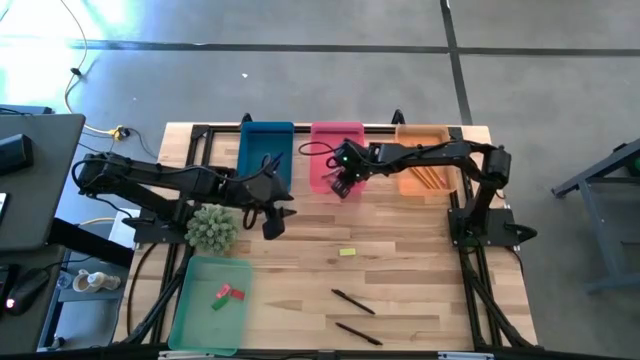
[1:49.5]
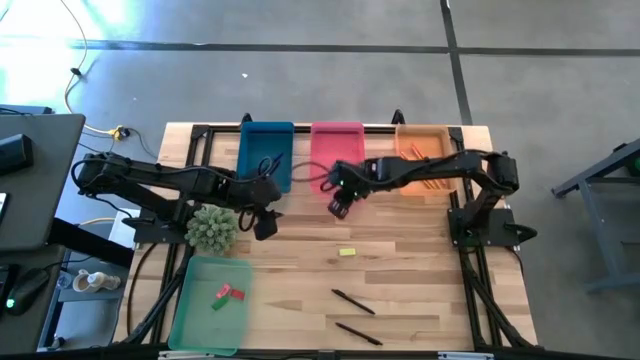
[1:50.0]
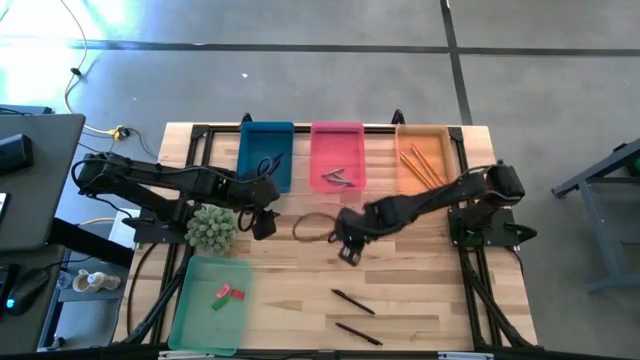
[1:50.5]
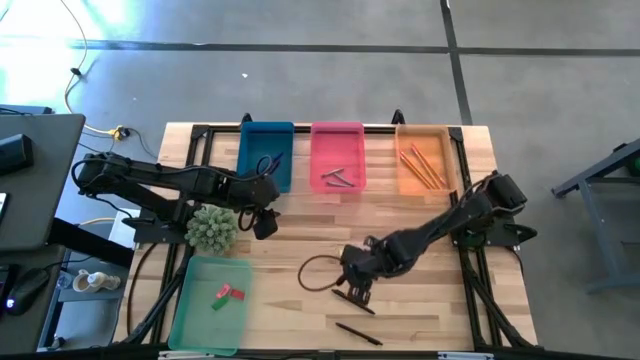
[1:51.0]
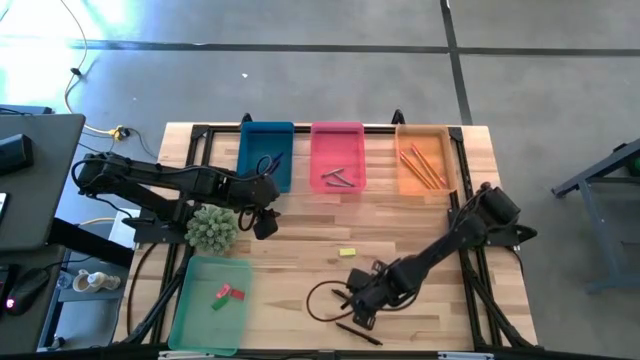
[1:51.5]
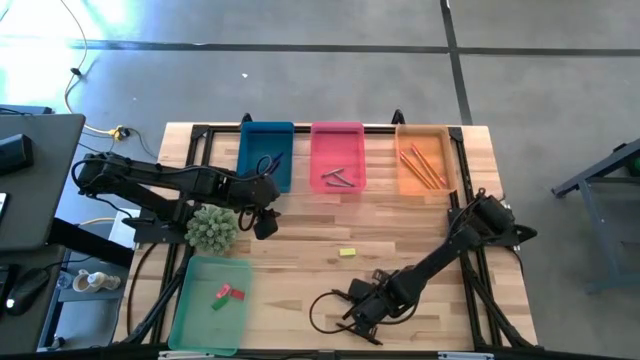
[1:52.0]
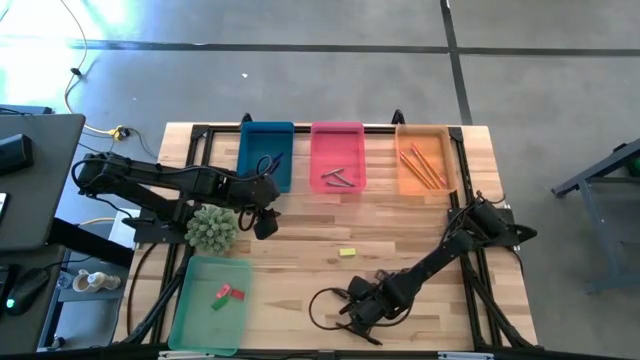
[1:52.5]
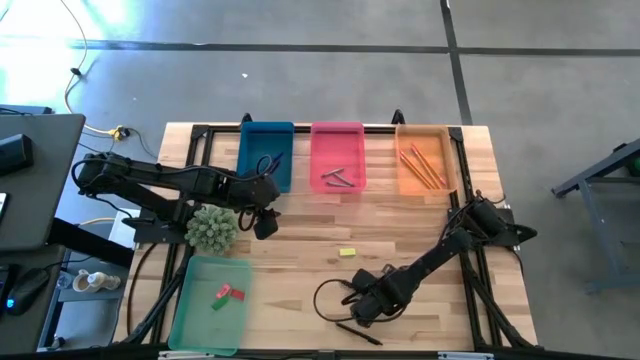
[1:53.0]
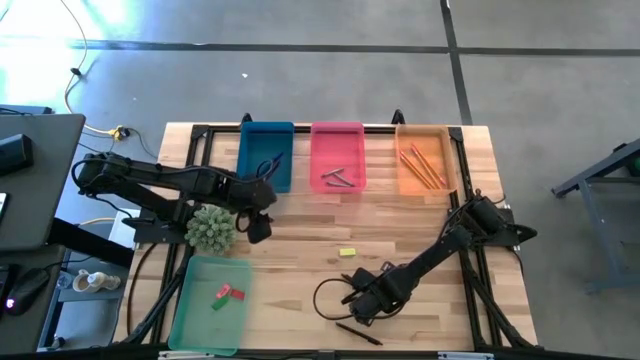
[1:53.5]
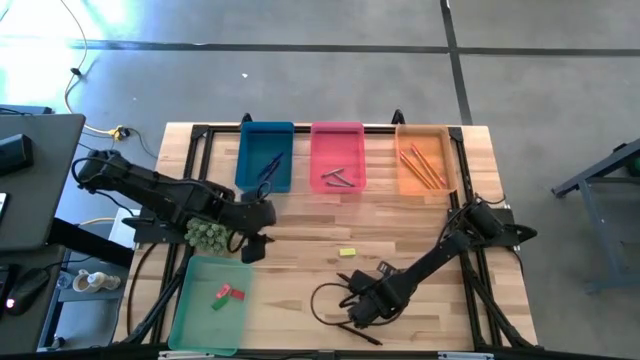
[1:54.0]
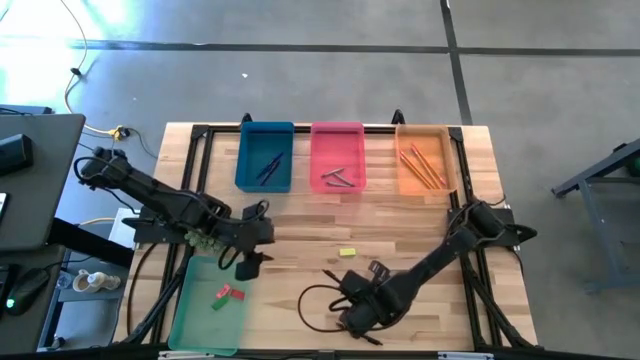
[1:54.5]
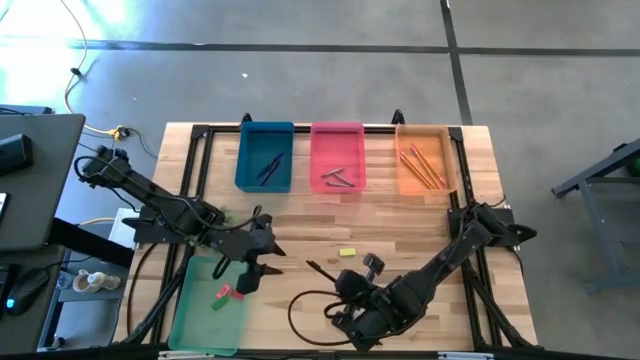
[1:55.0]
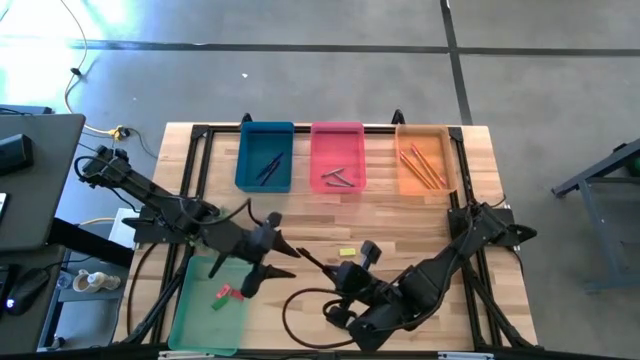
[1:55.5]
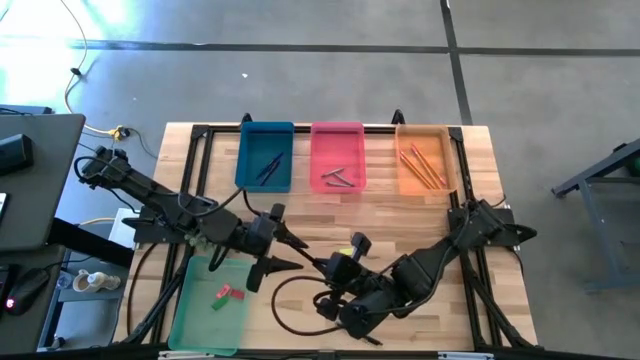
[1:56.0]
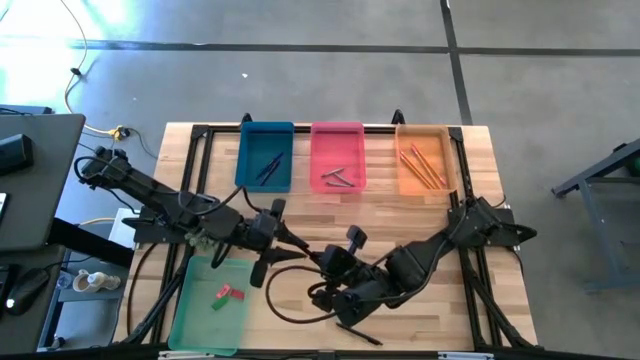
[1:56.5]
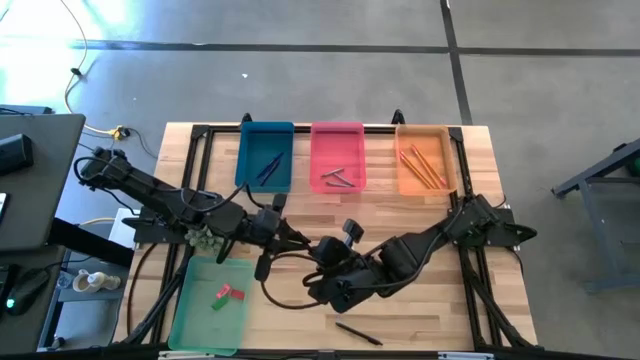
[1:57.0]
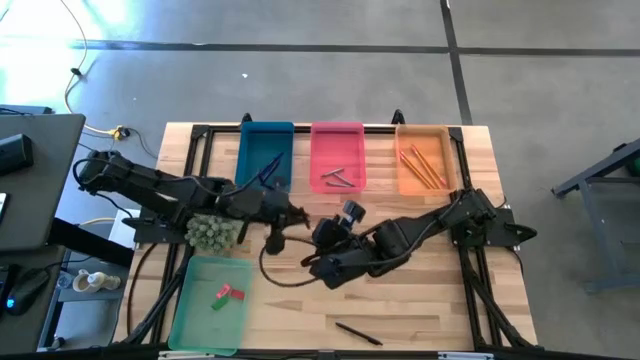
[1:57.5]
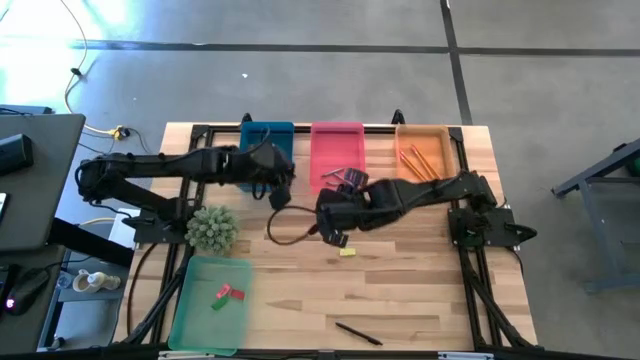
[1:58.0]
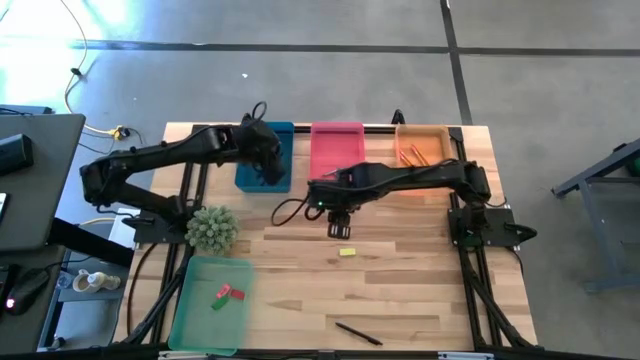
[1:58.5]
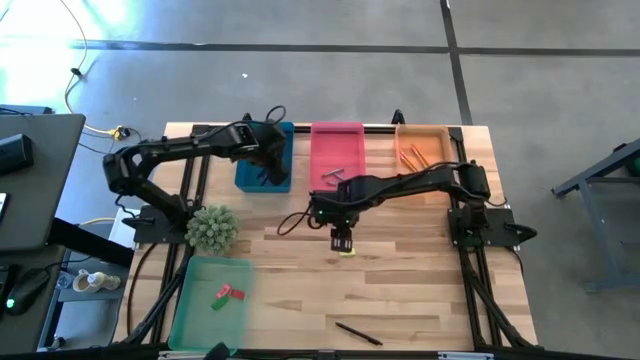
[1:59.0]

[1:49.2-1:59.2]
Task: Sort crayons/erasers/pens/pencils in bins
Put the black pen into the blue bin

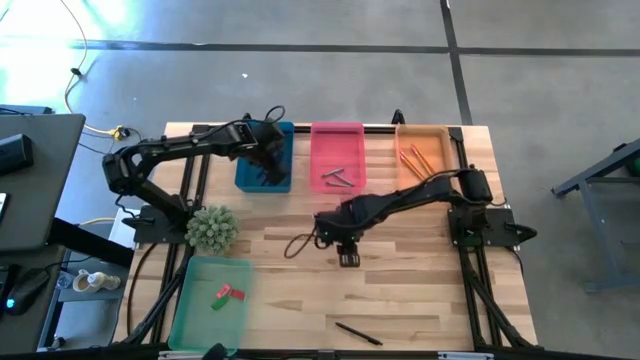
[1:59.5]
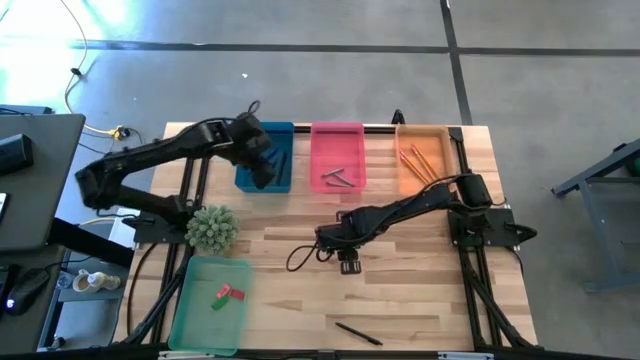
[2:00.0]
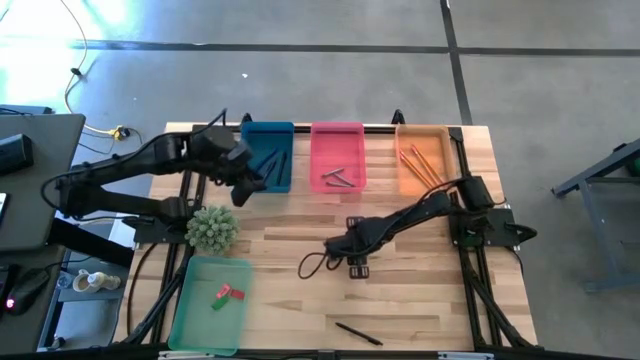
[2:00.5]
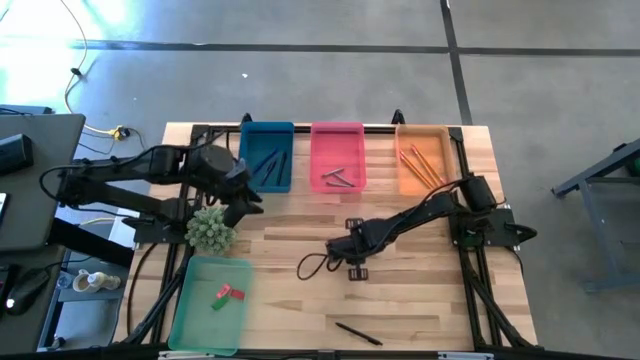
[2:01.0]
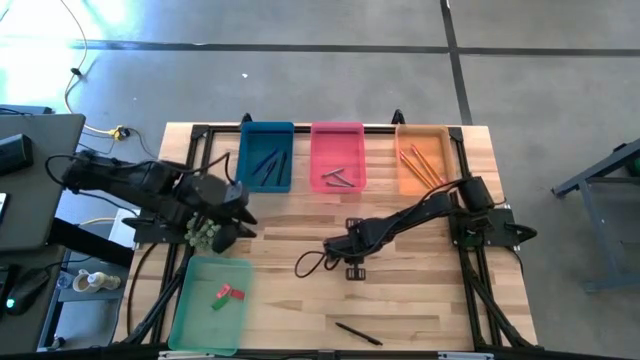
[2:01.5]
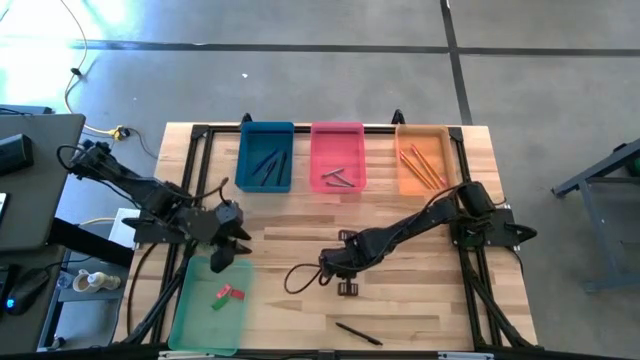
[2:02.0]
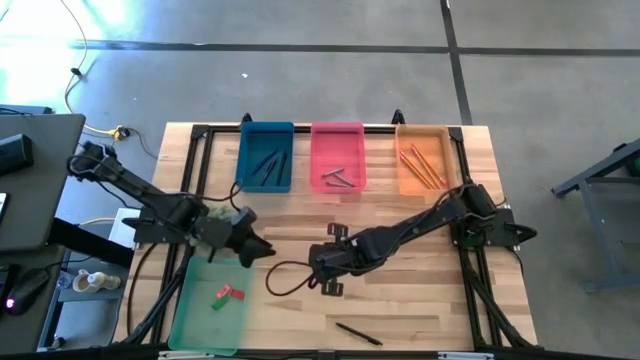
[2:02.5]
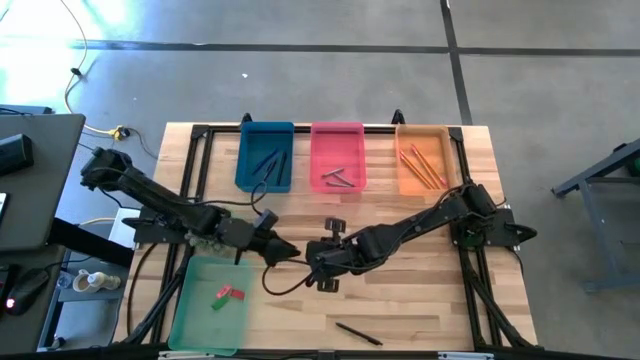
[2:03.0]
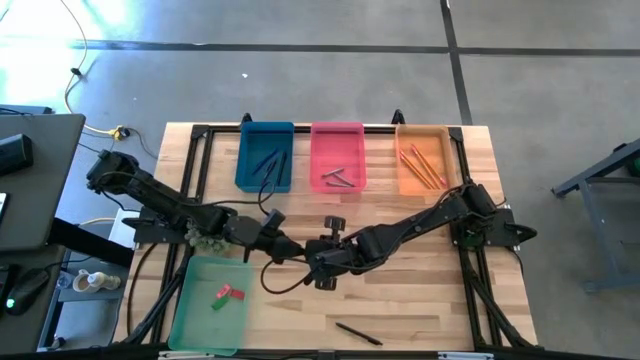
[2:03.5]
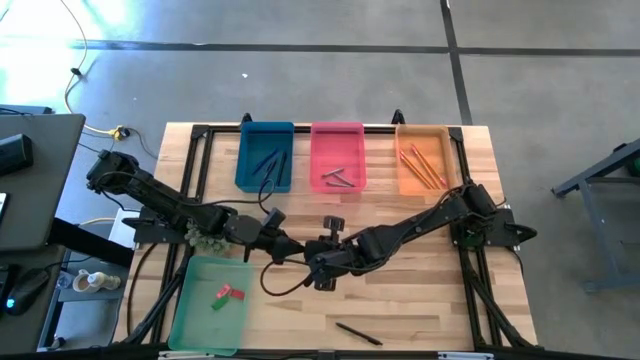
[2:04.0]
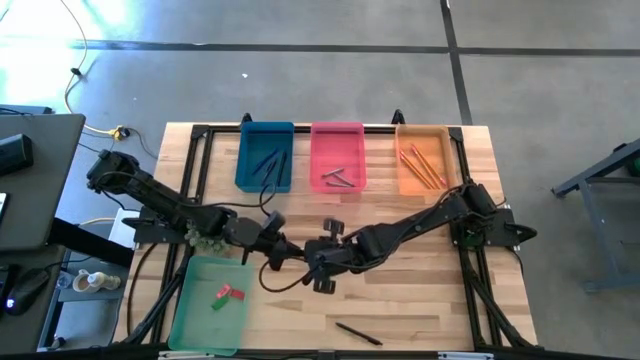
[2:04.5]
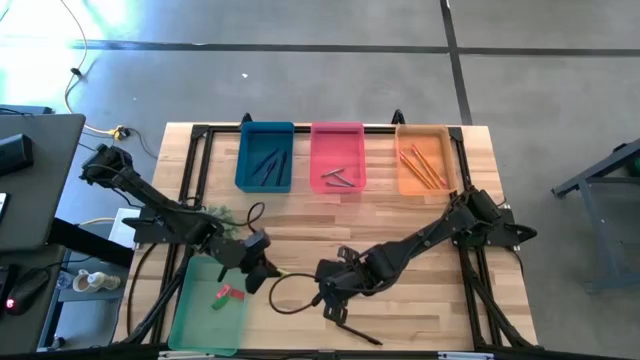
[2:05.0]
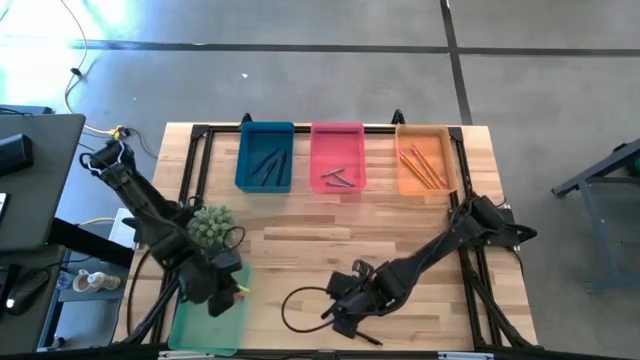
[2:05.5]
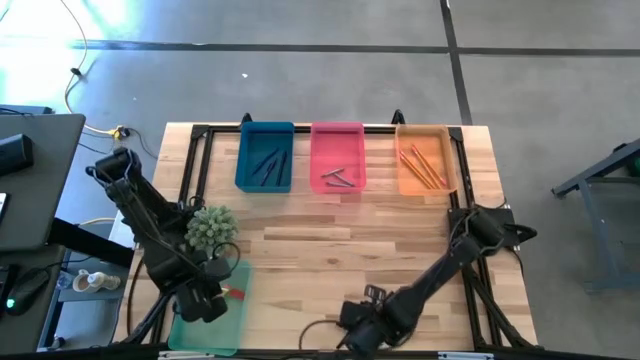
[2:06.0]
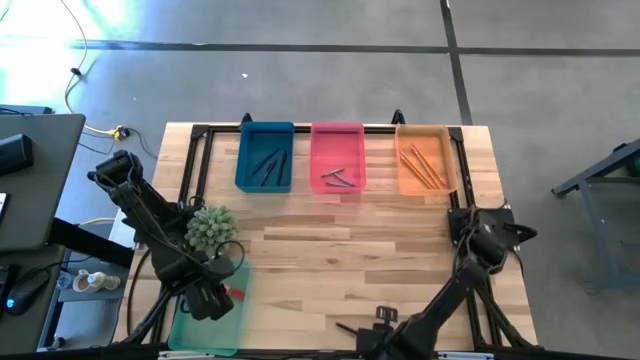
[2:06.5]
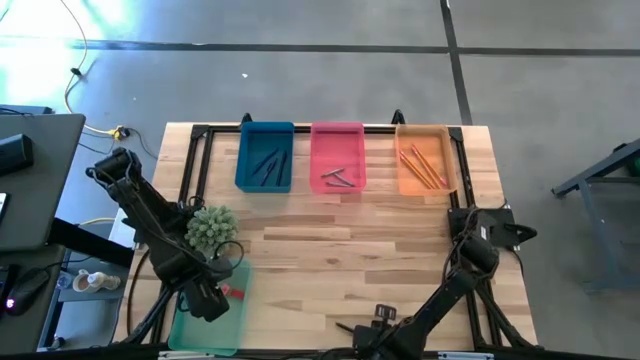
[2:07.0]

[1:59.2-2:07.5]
Put the light green eraser into the green bin

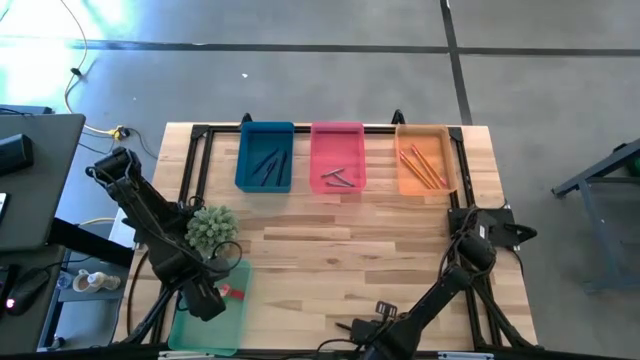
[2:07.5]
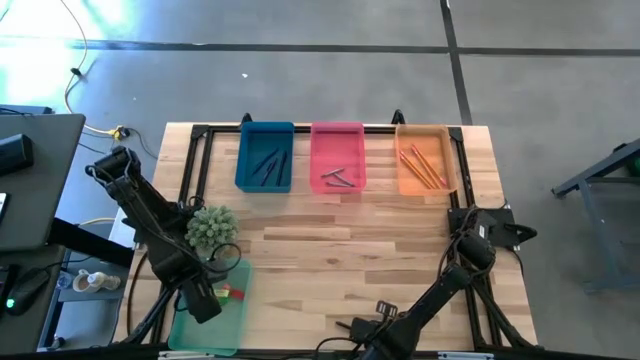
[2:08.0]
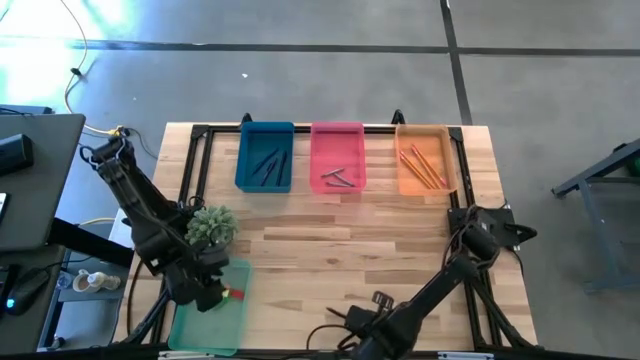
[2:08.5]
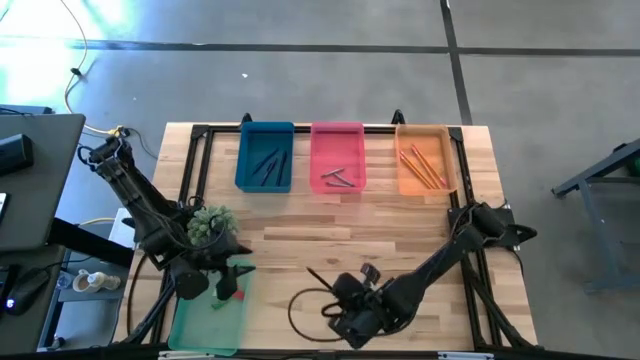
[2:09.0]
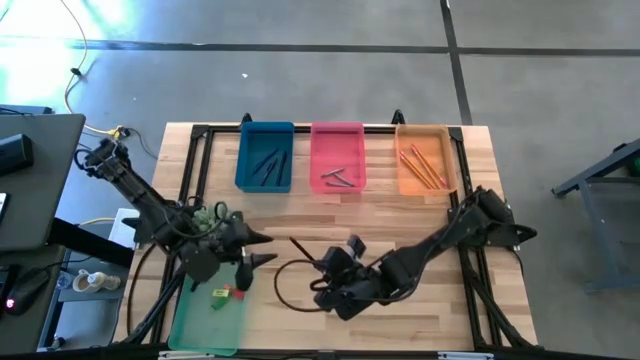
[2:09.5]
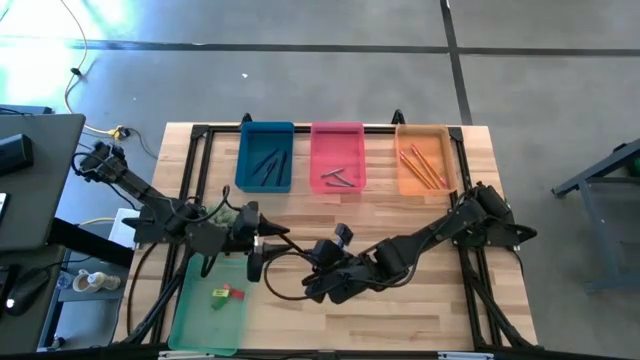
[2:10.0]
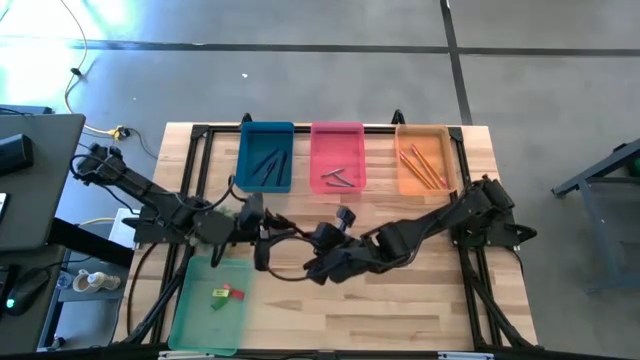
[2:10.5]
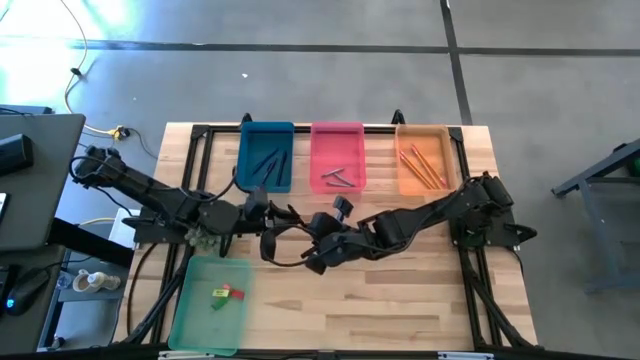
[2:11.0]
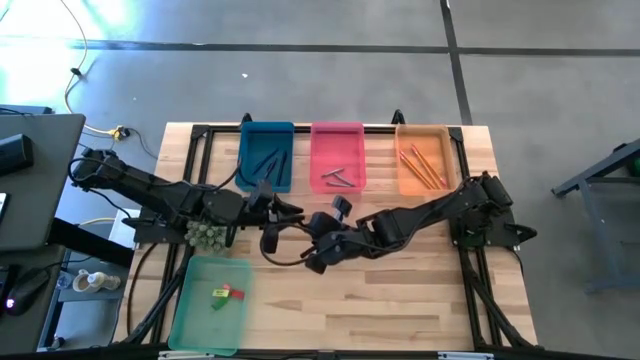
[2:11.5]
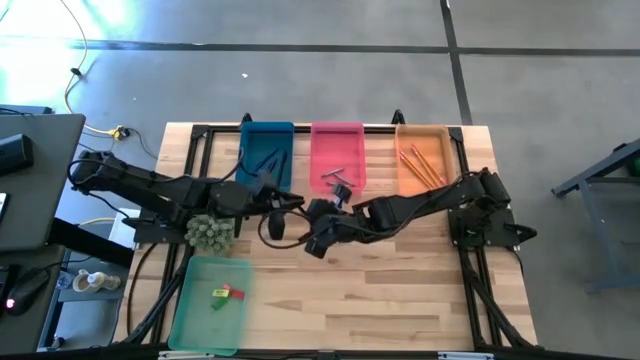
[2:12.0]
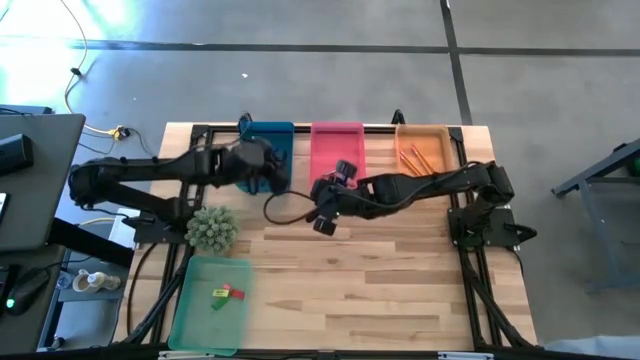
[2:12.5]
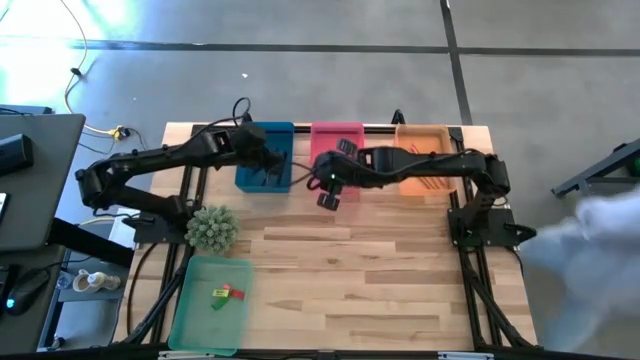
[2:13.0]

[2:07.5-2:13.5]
Put the black pen into the blue bin
